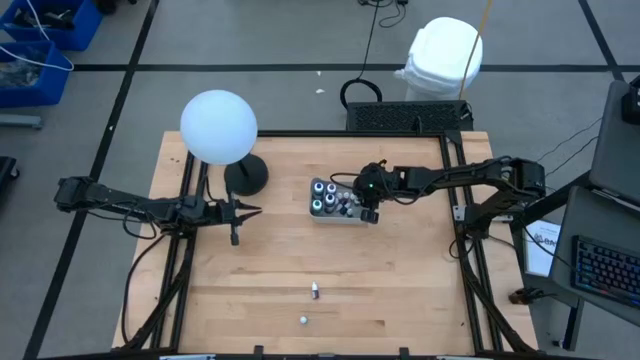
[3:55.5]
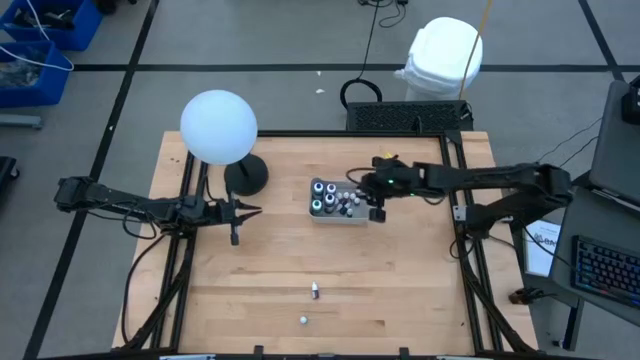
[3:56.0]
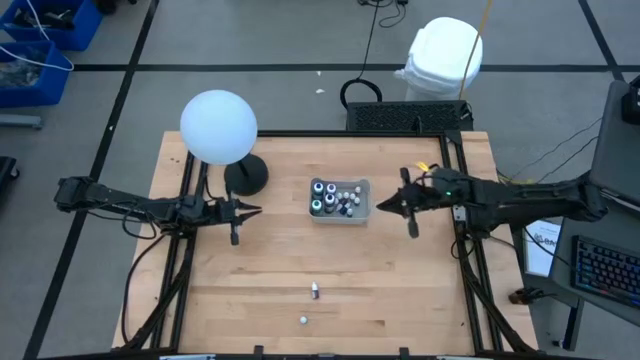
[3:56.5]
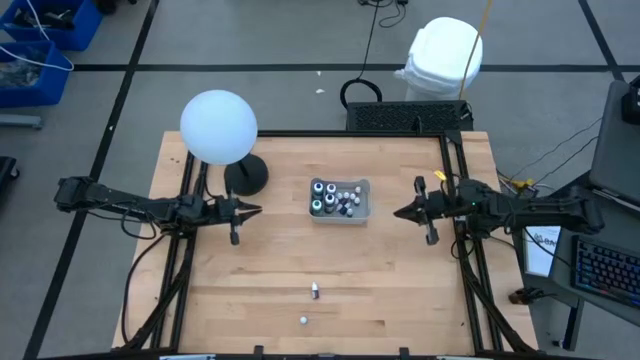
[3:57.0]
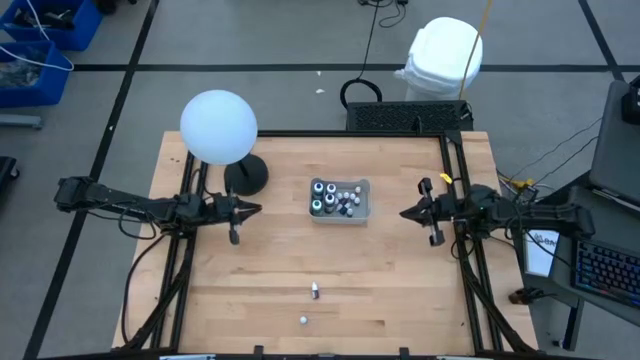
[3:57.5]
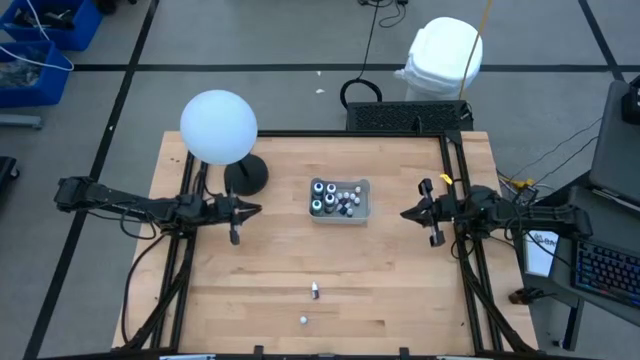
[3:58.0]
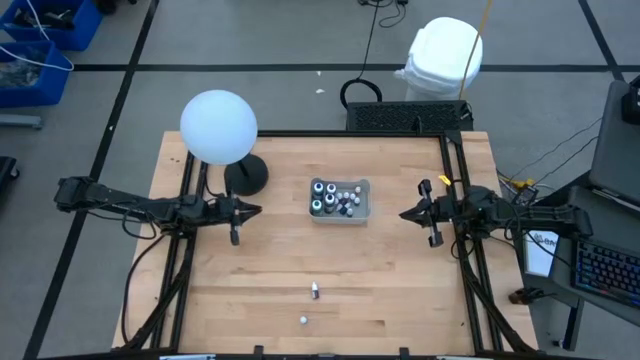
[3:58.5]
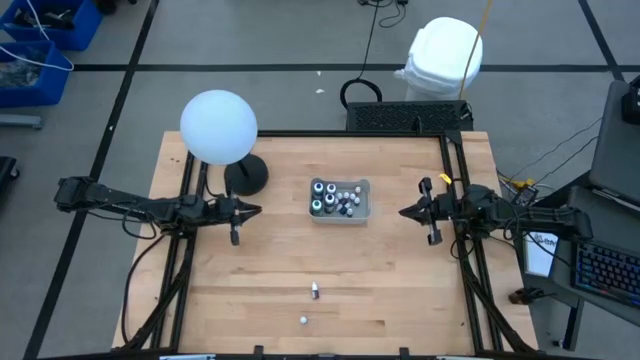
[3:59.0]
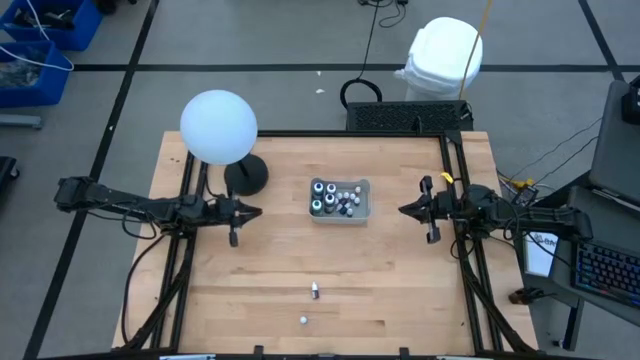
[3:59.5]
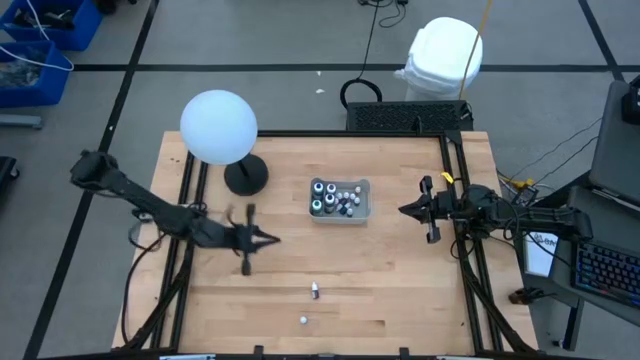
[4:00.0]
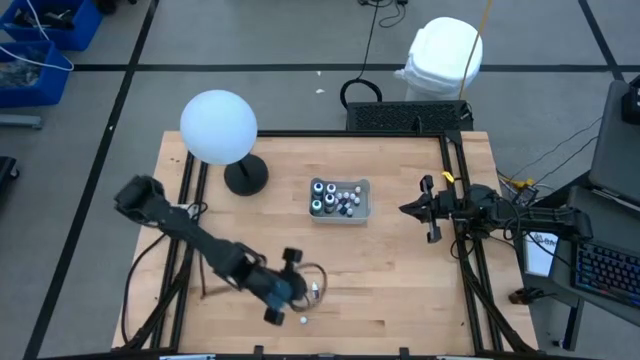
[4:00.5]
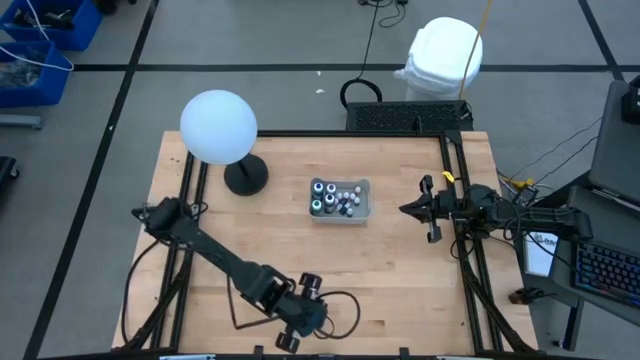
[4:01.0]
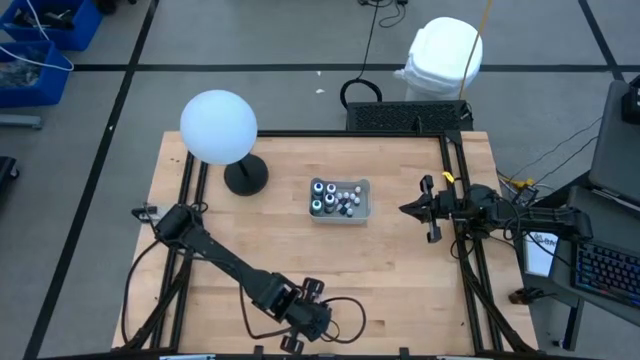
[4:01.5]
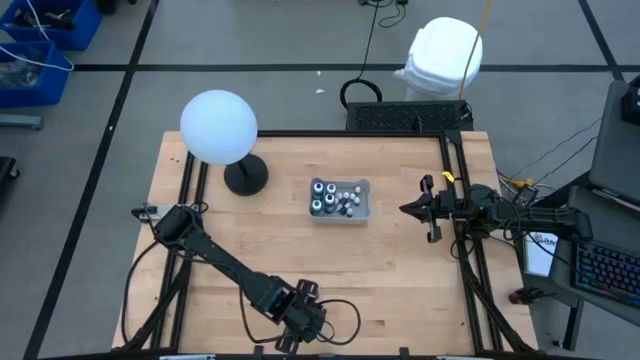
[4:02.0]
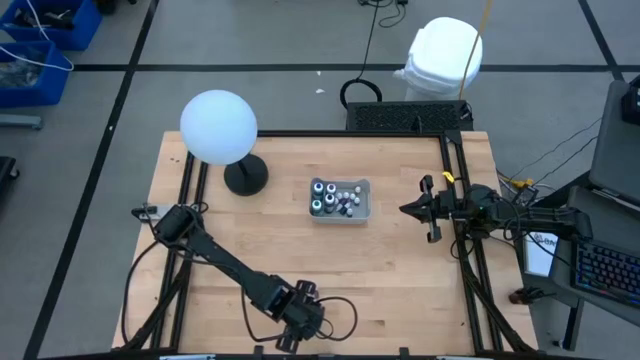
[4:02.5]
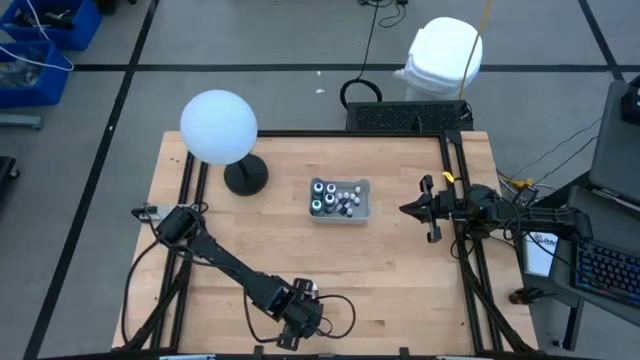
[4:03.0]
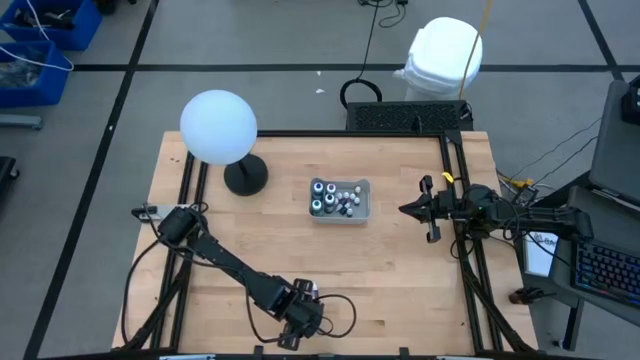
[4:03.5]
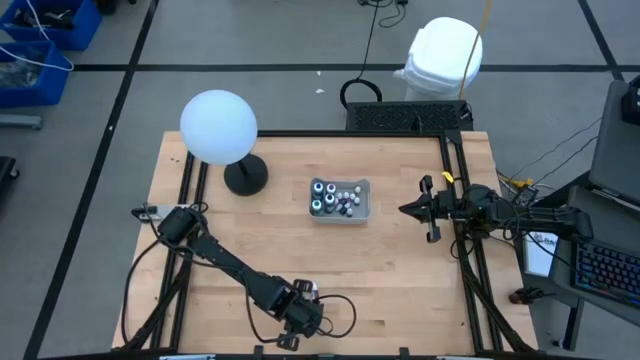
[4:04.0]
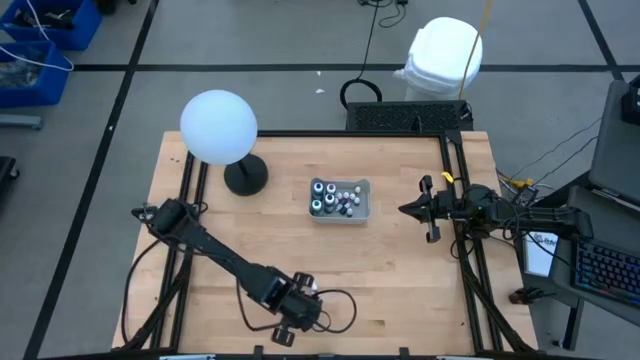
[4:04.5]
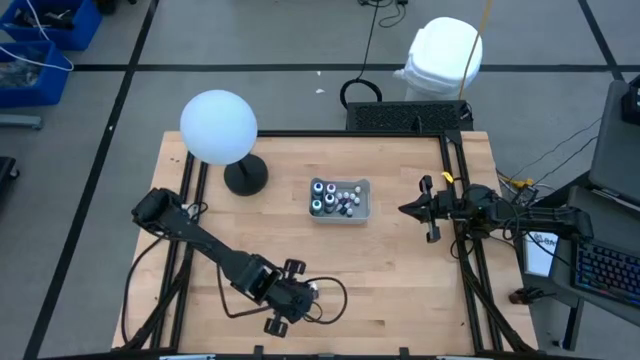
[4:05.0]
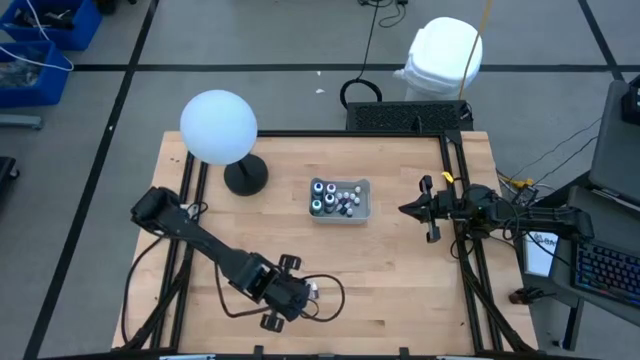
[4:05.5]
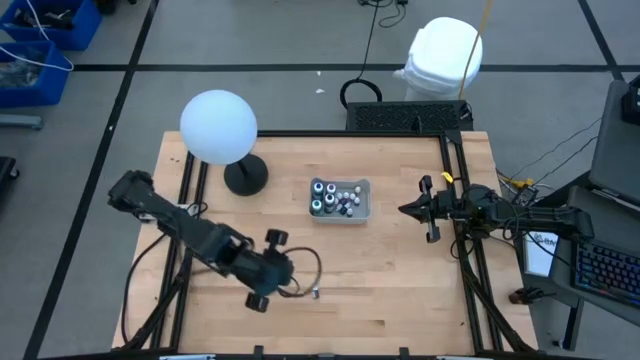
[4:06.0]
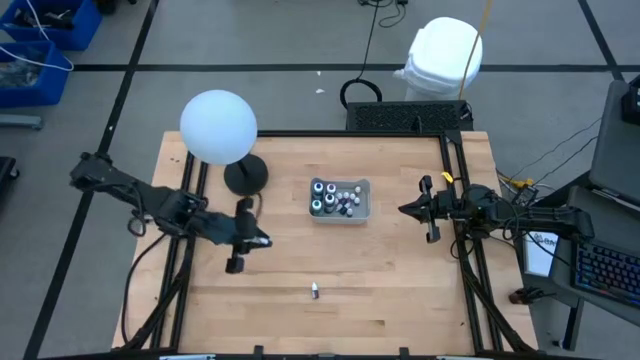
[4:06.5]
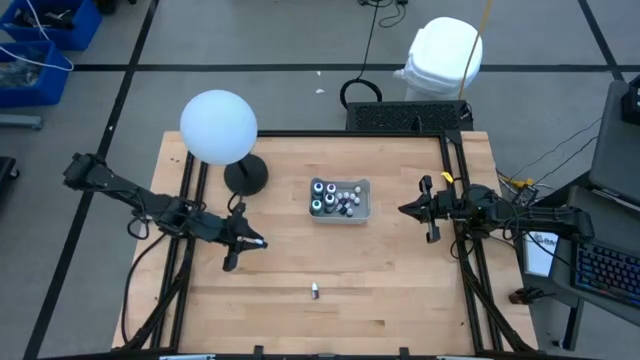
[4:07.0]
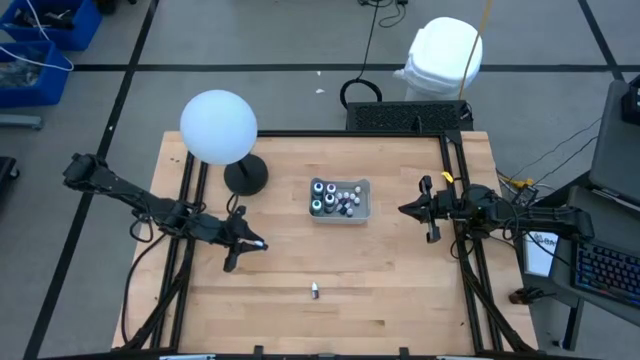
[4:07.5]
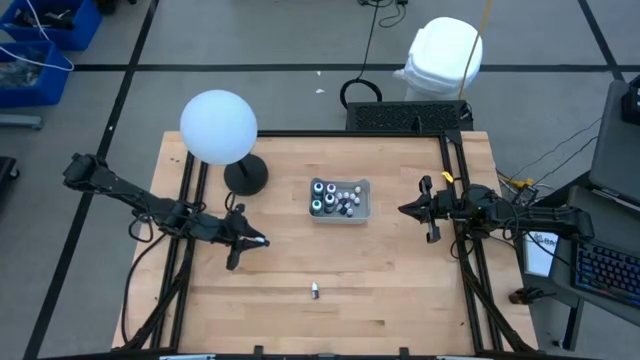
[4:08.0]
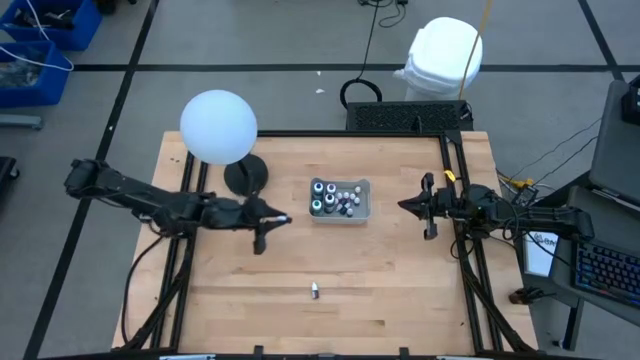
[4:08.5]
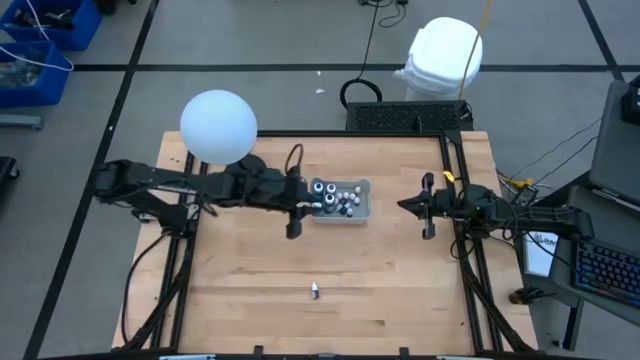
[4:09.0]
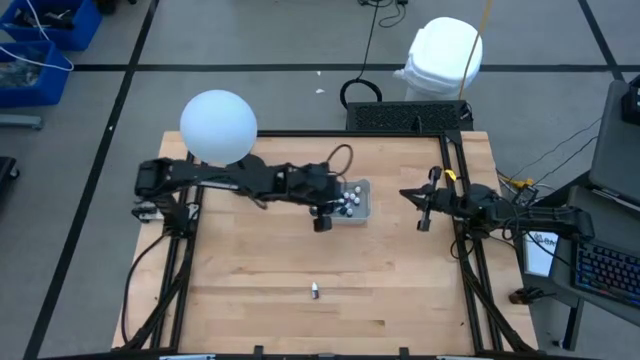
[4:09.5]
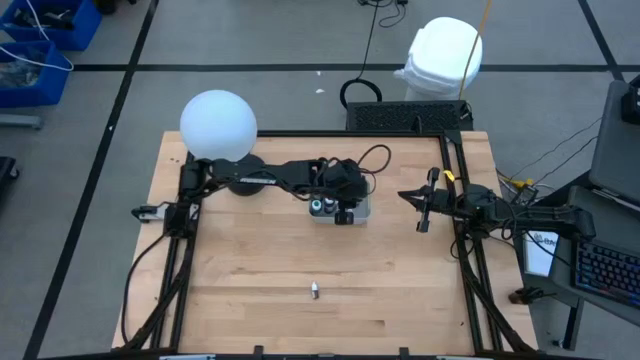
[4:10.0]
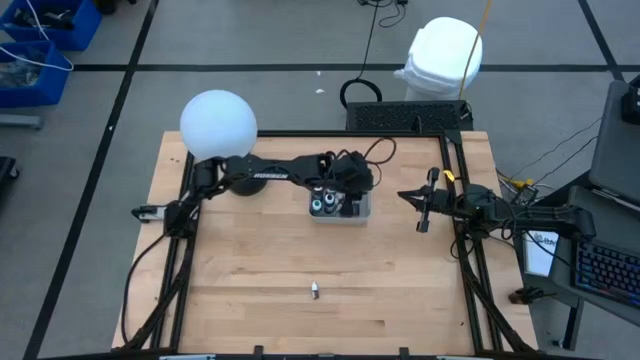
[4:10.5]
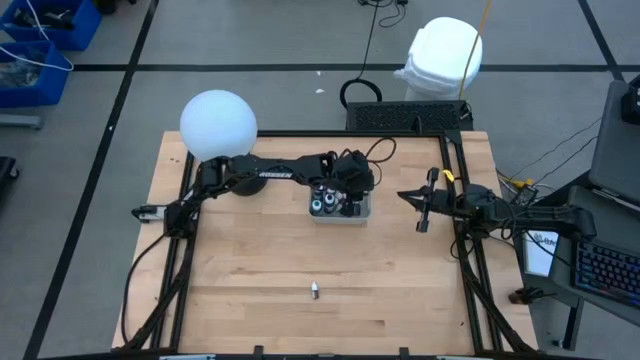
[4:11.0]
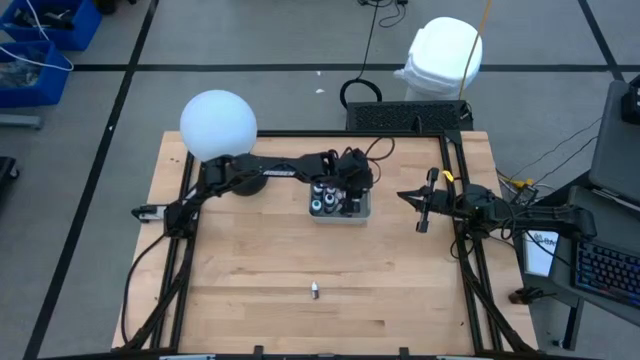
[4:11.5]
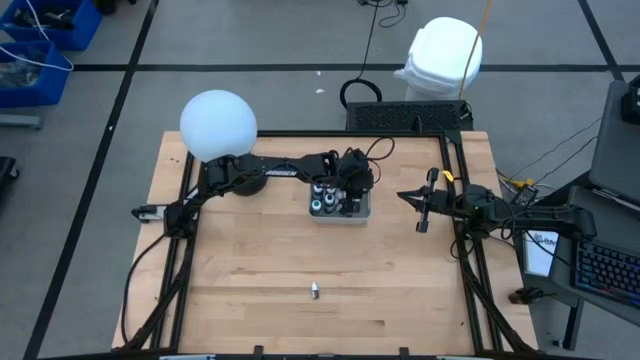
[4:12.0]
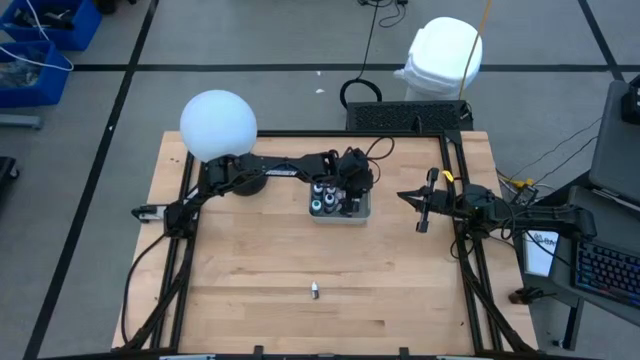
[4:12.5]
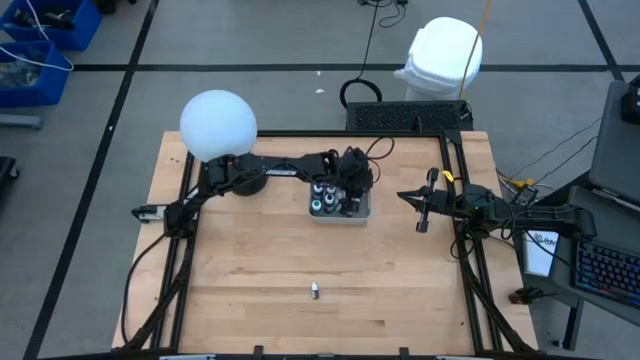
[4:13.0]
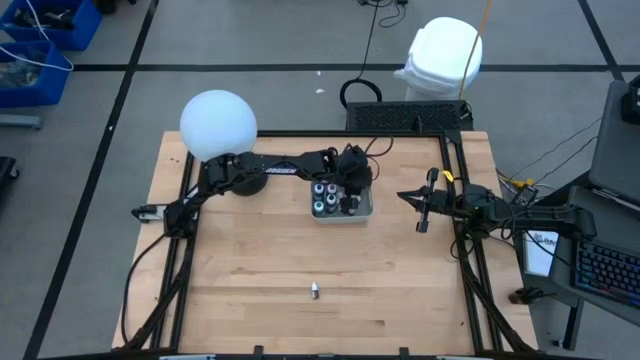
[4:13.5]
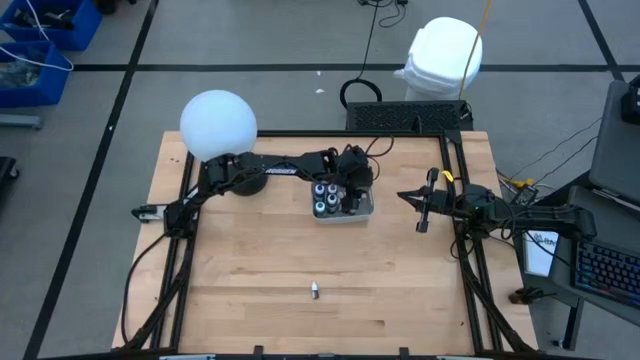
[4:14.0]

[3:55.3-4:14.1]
Task: Pick & Place food coloring
Put the small green food coloring bottle into the gray bin

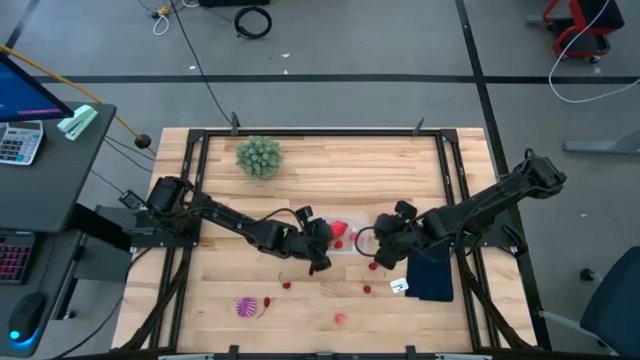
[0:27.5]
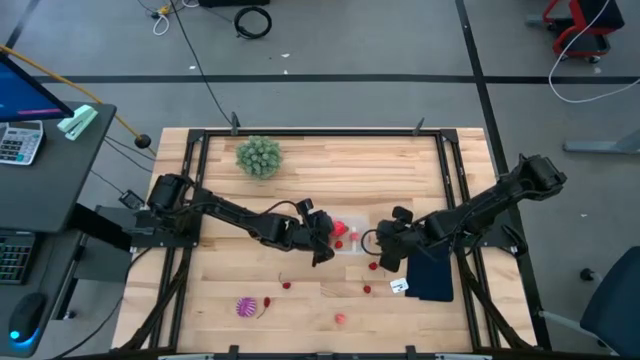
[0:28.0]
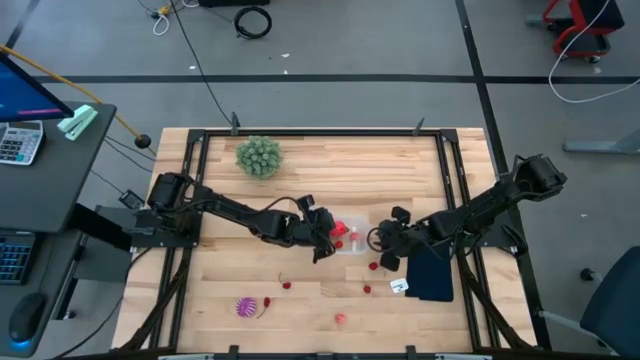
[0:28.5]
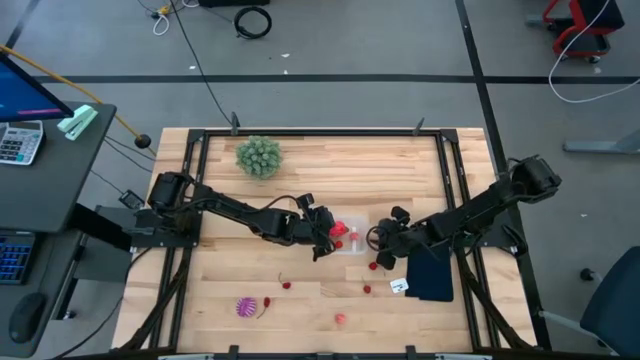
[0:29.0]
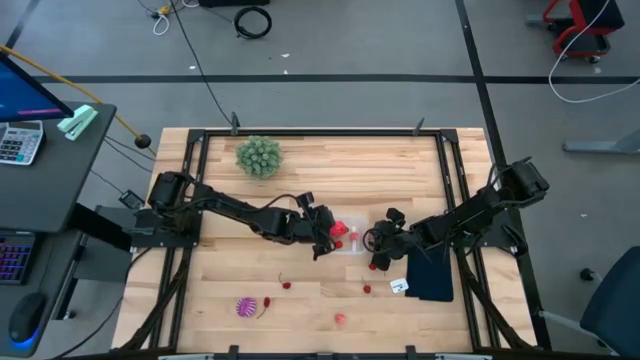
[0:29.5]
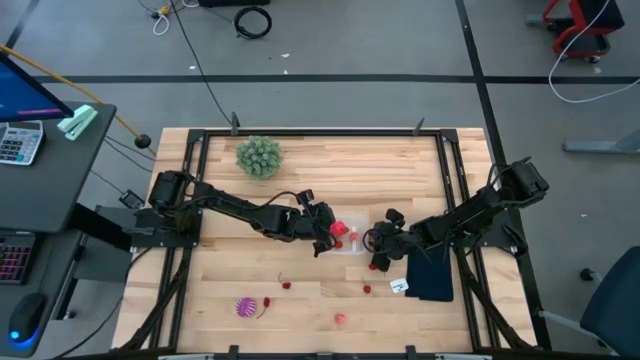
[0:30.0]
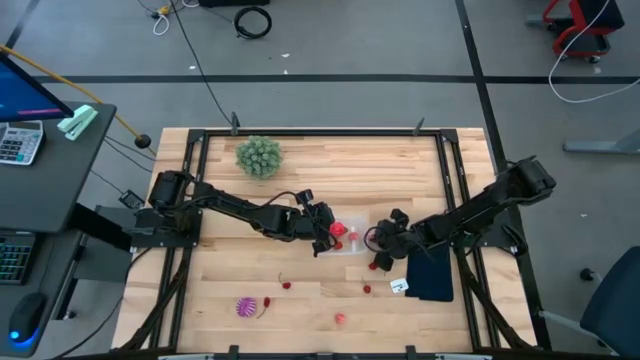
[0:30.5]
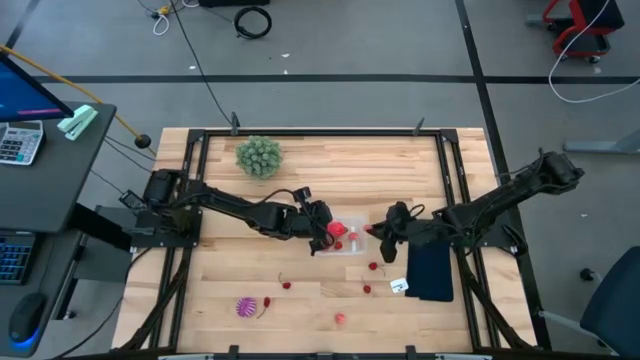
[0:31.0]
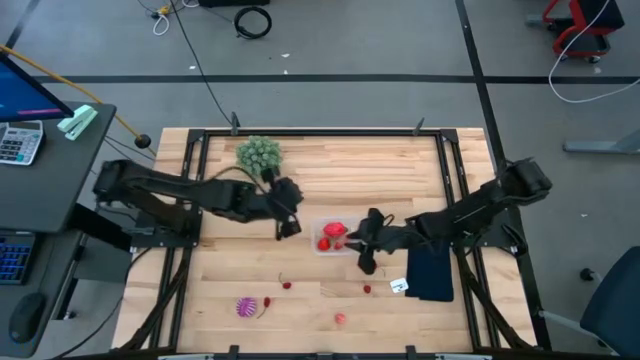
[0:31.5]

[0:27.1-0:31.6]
Task: Pick and placing Produce into tupperware
Put the pink peach into the transparent bin
